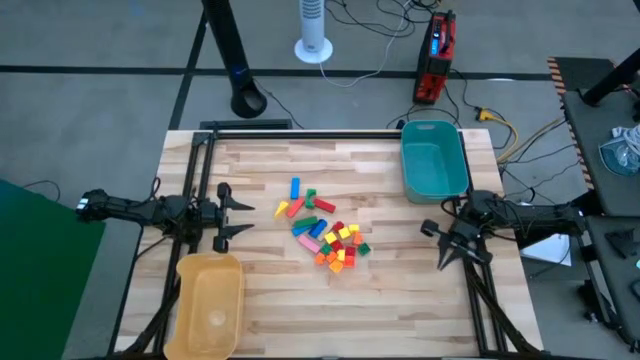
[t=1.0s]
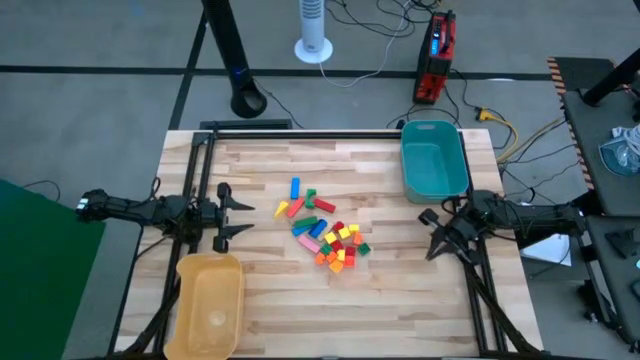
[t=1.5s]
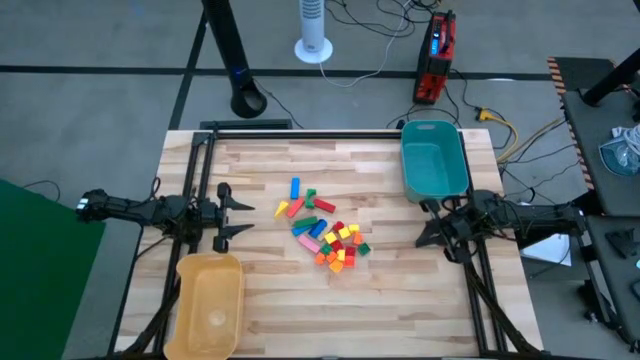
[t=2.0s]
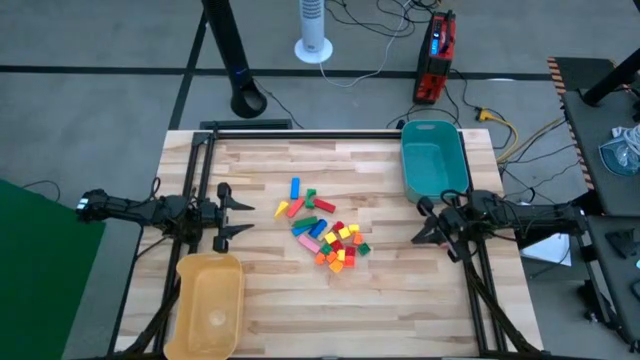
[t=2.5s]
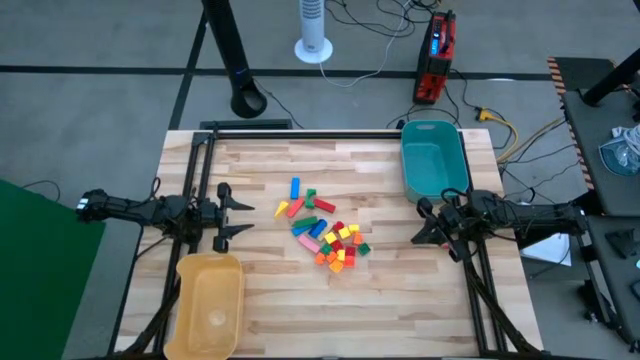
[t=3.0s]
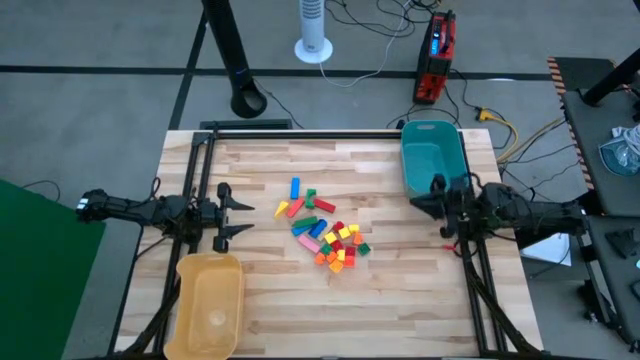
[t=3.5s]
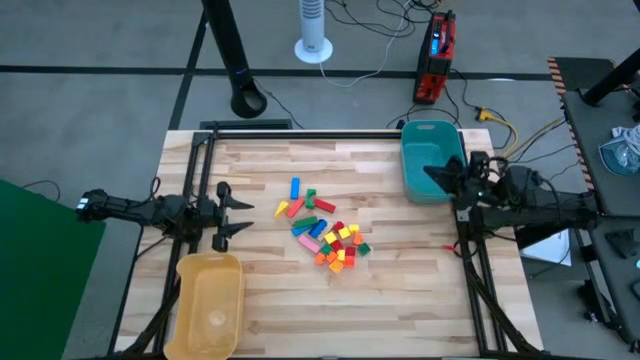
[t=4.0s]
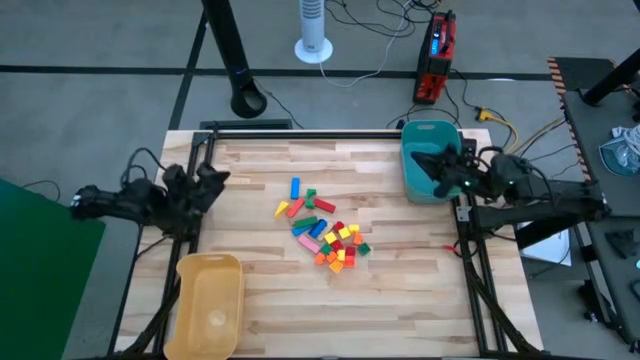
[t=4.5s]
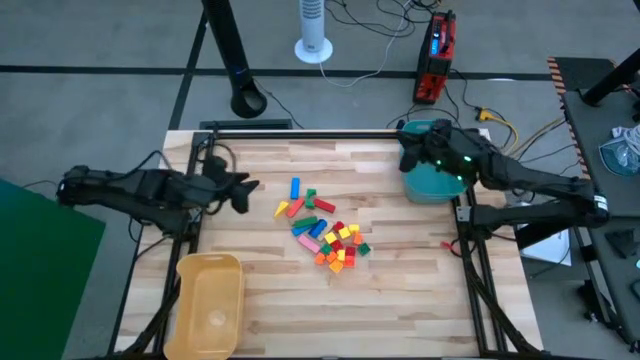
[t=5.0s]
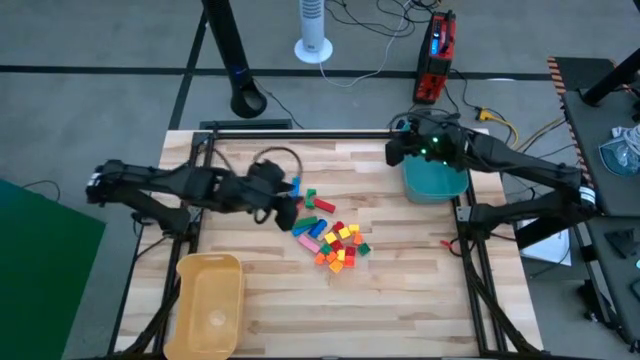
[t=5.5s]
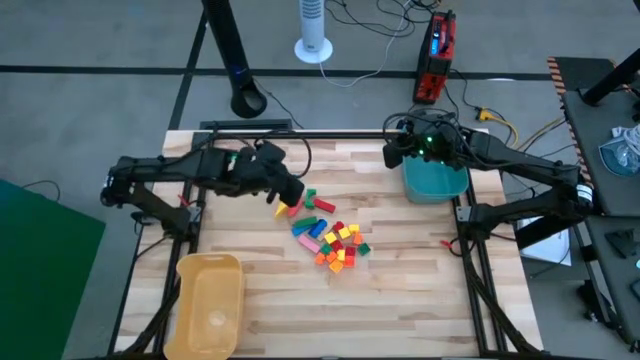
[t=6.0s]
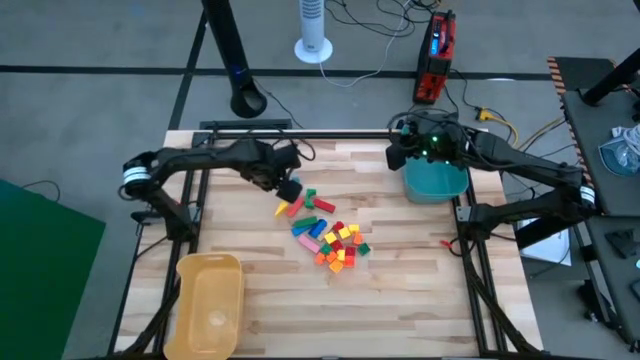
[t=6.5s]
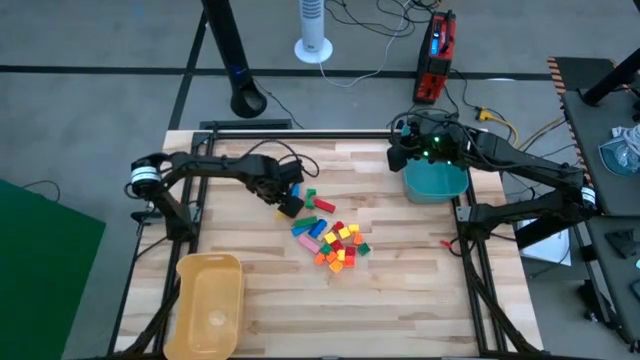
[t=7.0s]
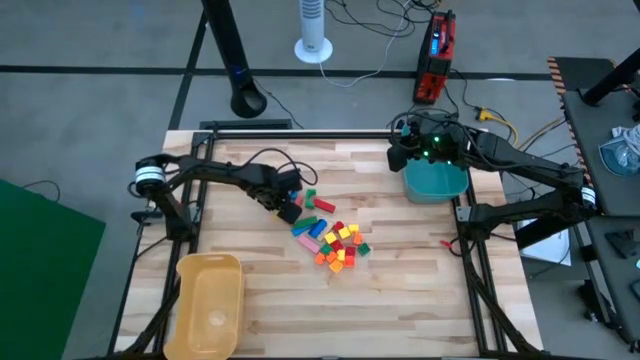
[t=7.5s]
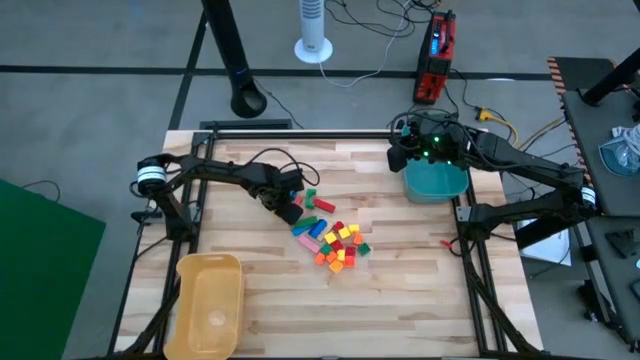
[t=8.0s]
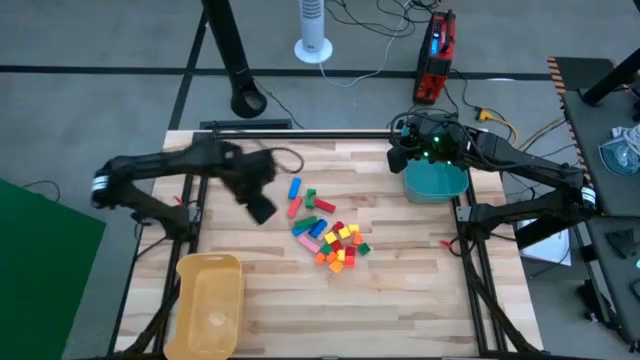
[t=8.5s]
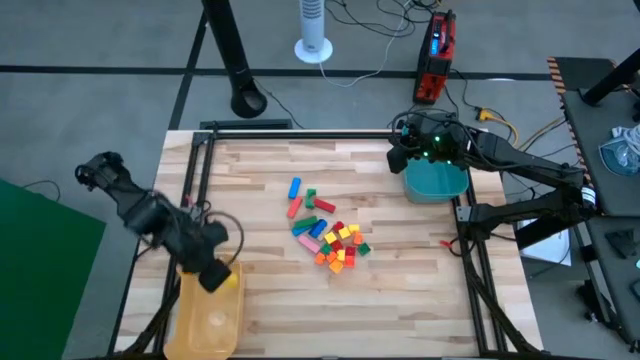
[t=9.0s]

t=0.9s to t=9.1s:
Task: Sort blocks
Put the yellow triangular block into the yellow bin

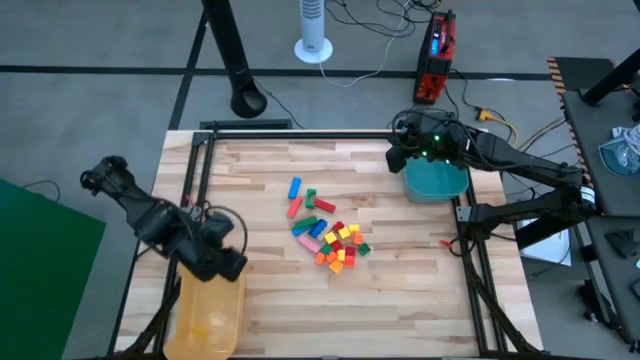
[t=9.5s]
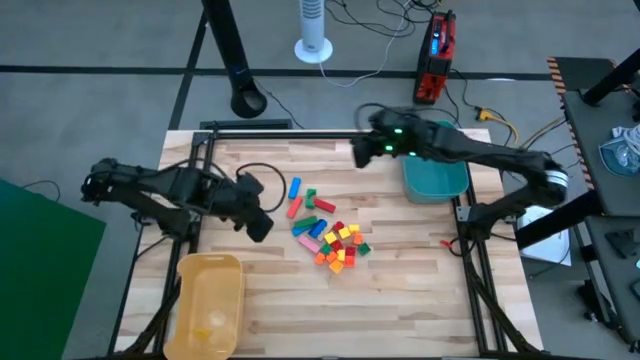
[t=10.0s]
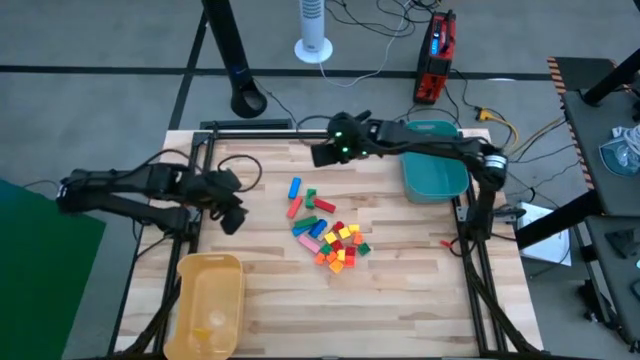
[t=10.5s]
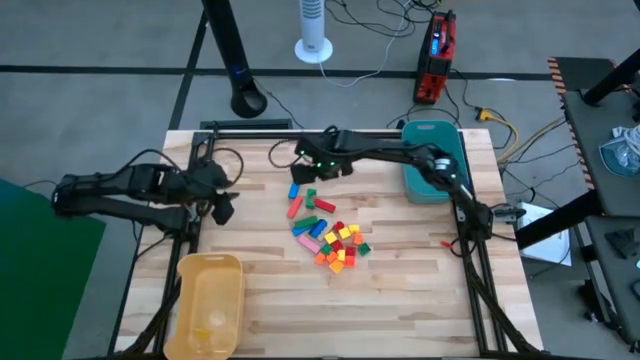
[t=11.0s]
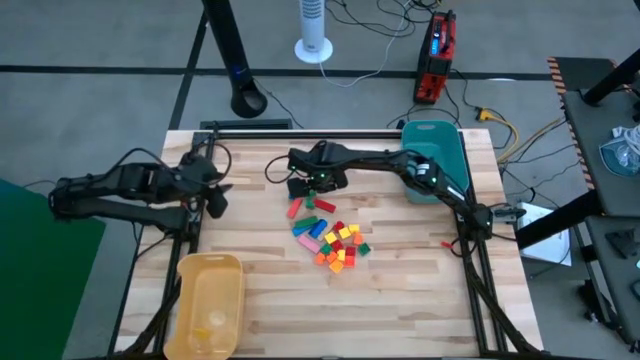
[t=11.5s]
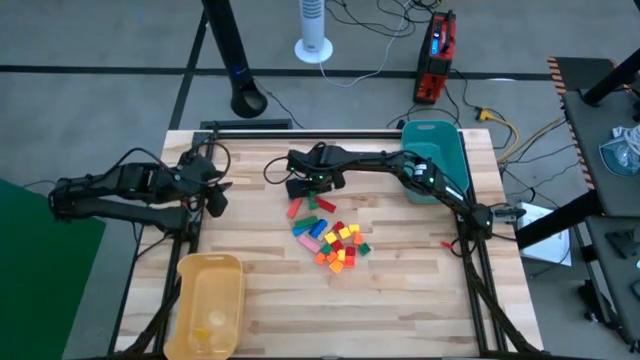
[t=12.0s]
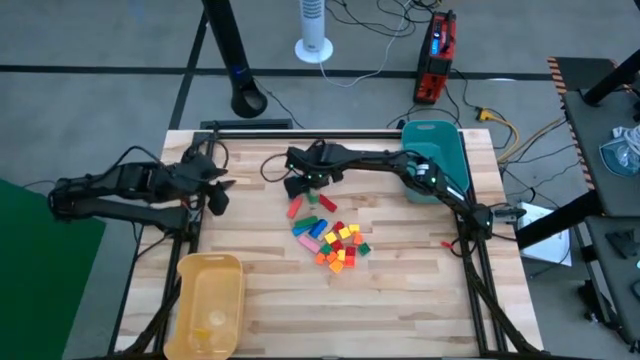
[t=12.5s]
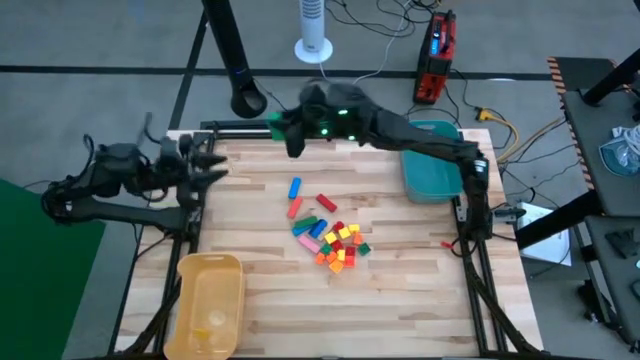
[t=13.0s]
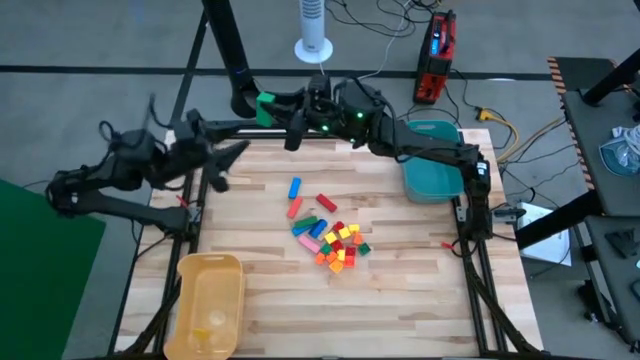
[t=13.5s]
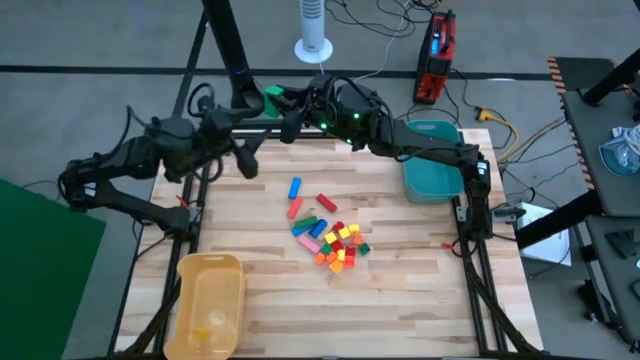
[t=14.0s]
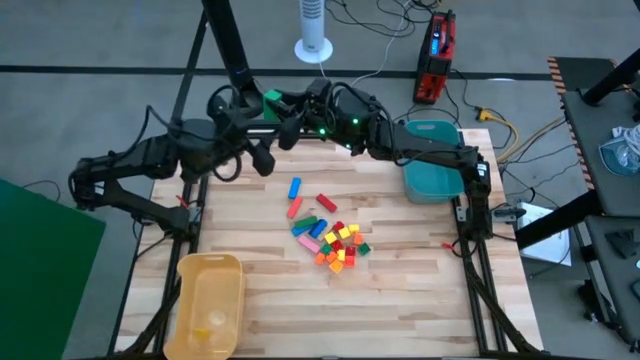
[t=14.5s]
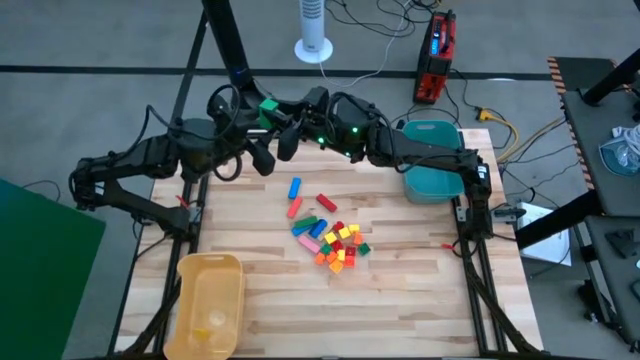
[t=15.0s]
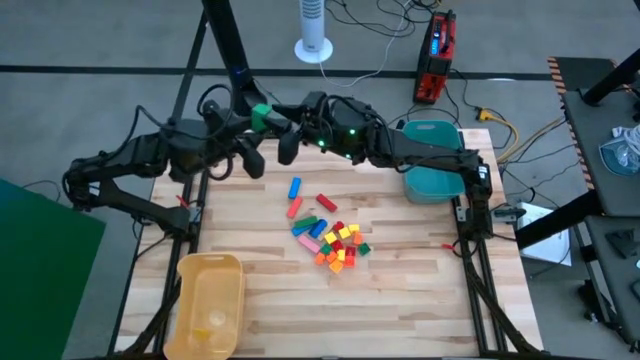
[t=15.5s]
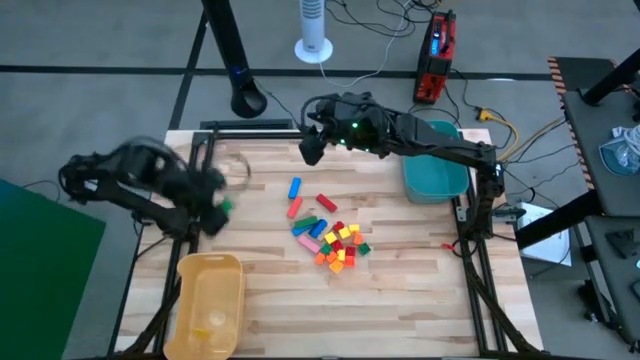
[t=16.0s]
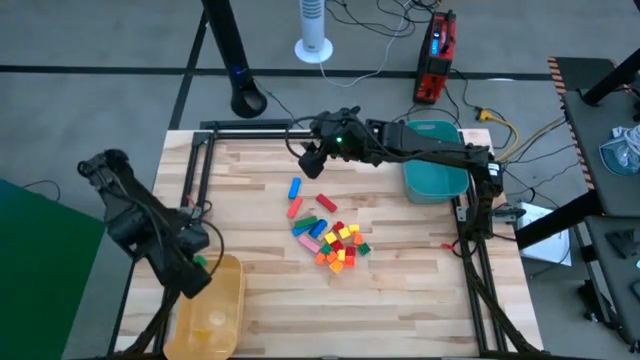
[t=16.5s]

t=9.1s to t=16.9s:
Put the green arch block into the yellow bin

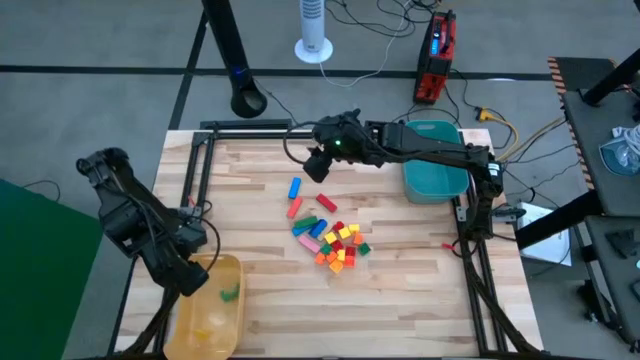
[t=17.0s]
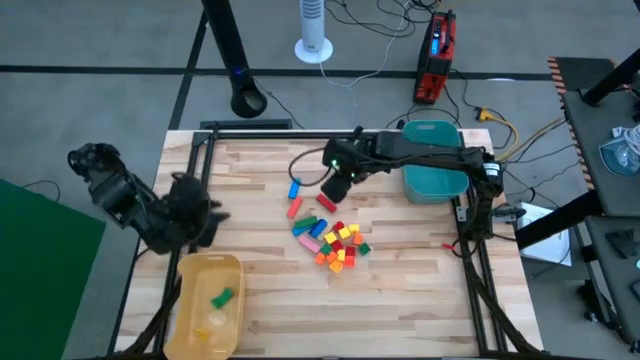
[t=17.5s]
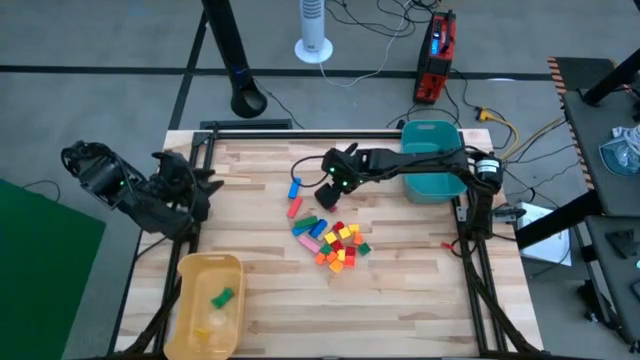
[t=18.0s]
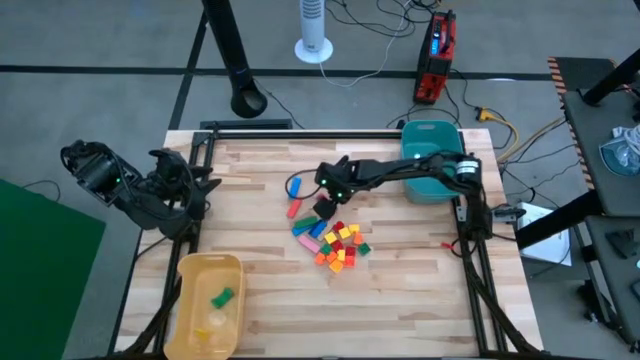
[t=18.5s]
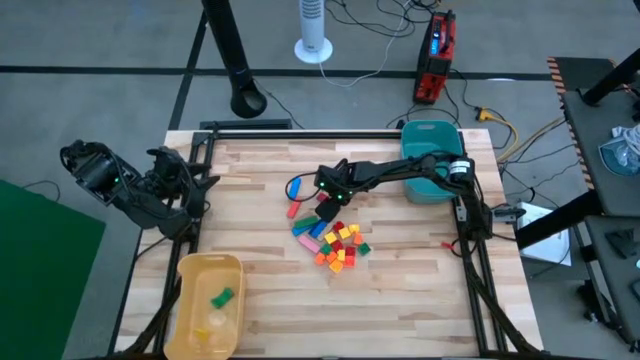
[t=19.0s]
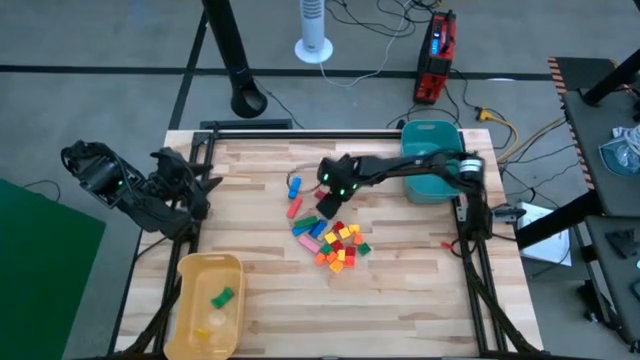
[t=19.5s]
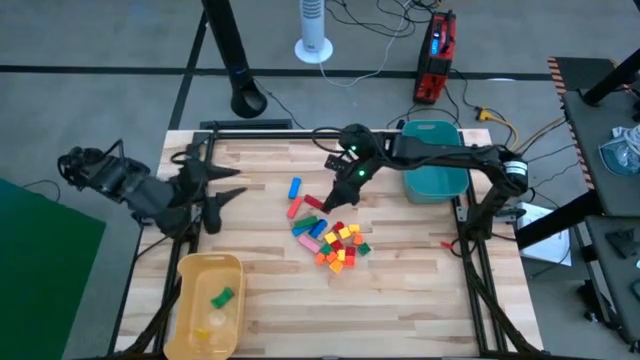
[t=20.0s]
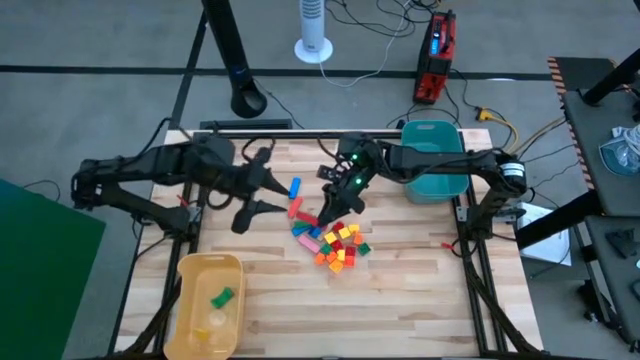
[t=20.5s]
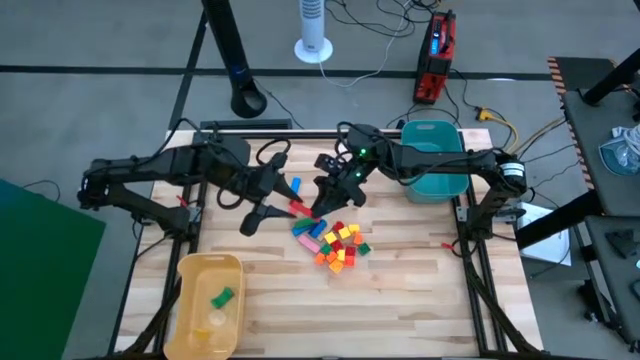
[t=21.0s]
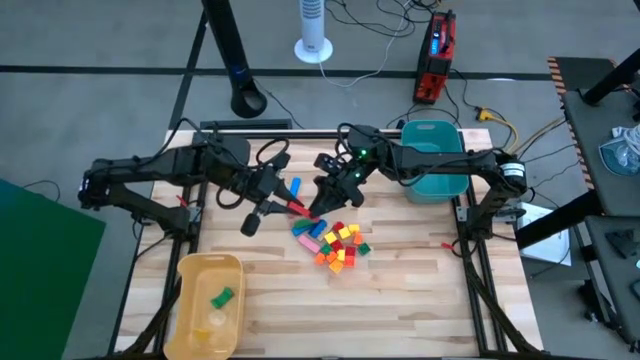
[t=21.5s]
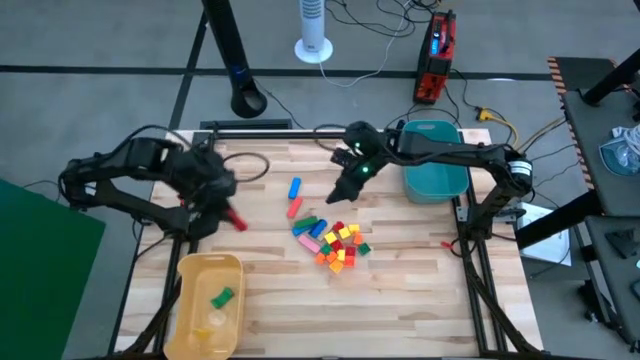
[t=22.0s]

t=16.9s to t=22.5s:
Put the red rectangular block into the yellow bin
